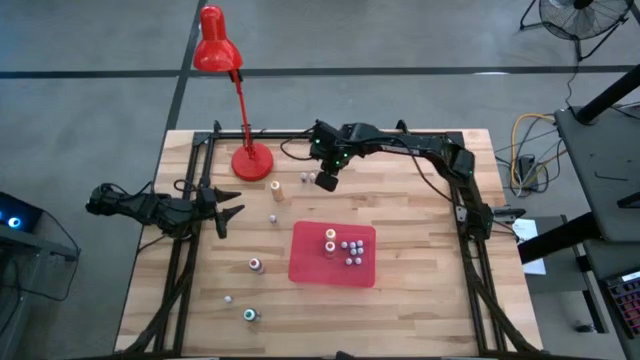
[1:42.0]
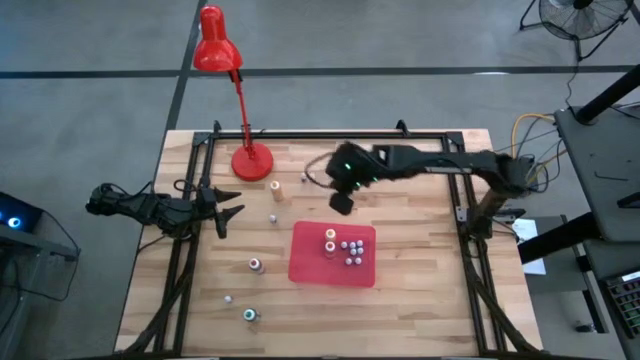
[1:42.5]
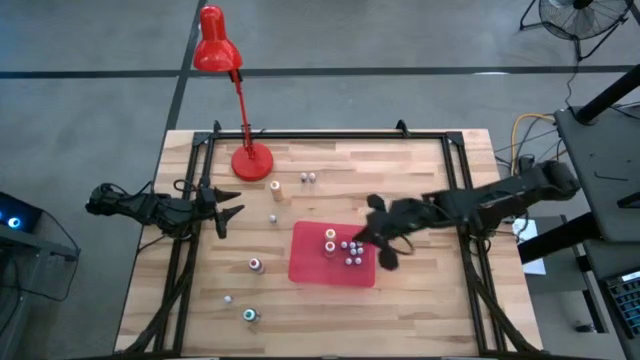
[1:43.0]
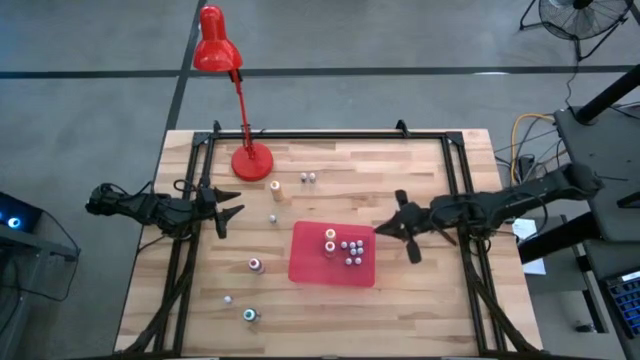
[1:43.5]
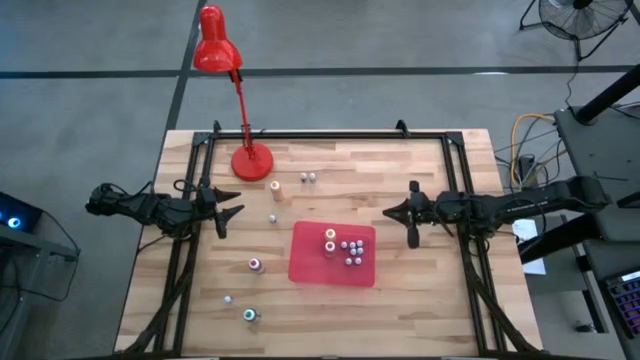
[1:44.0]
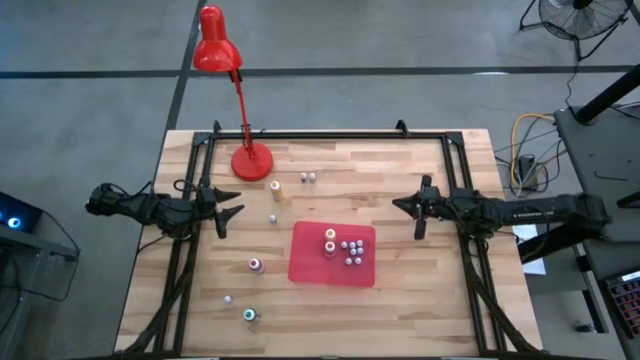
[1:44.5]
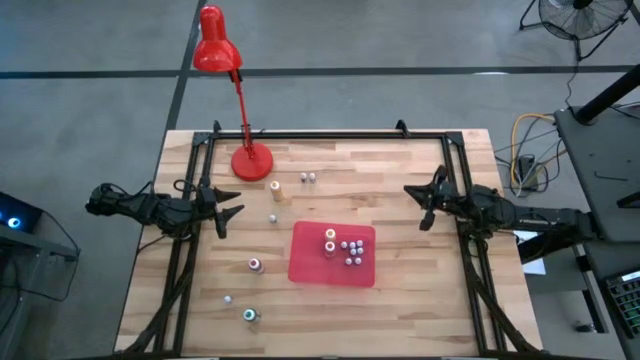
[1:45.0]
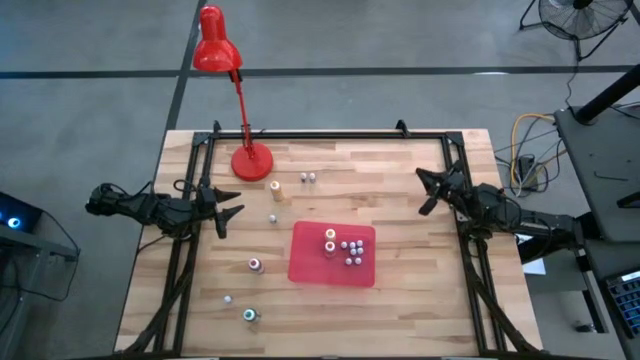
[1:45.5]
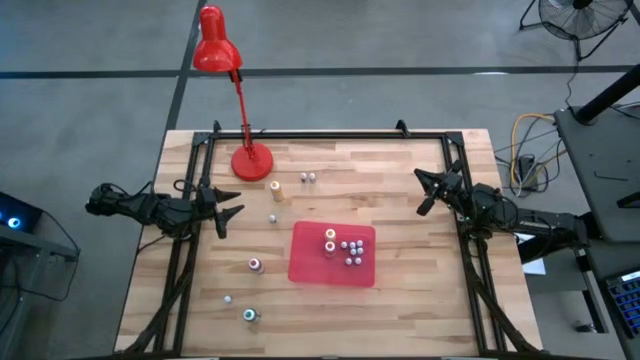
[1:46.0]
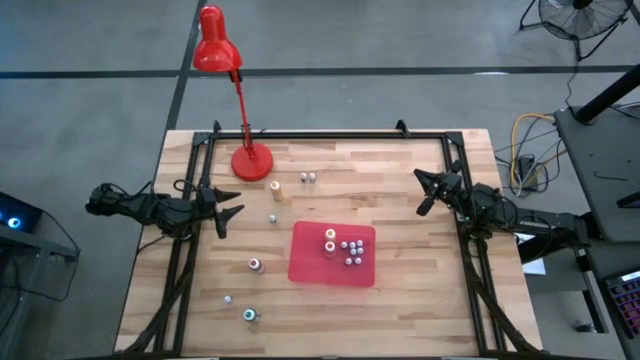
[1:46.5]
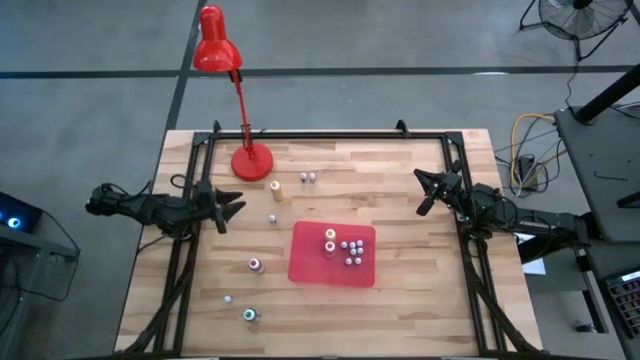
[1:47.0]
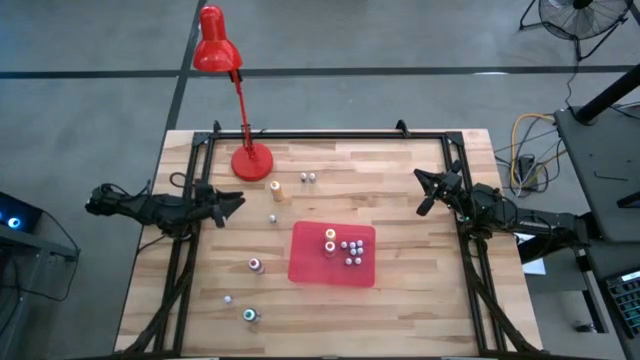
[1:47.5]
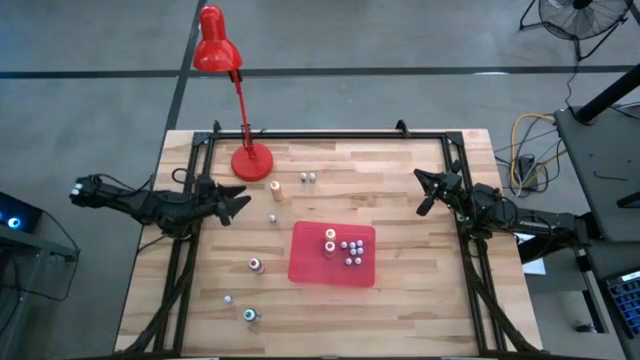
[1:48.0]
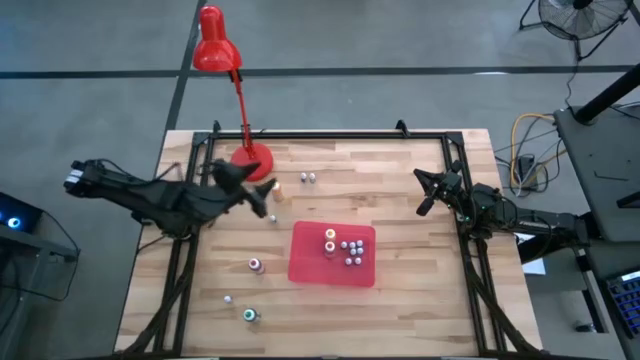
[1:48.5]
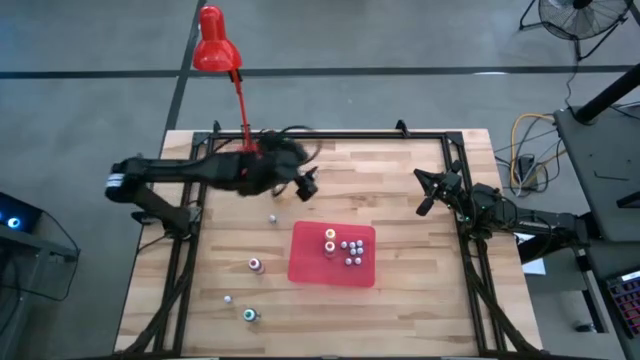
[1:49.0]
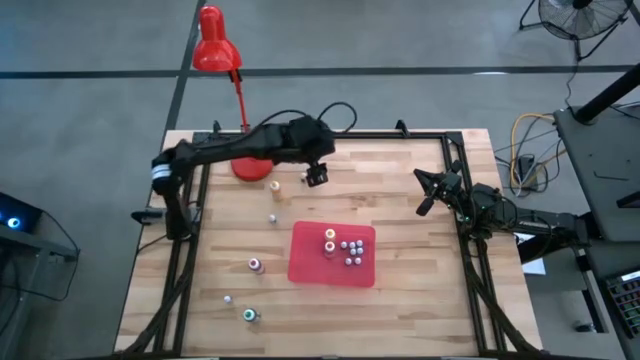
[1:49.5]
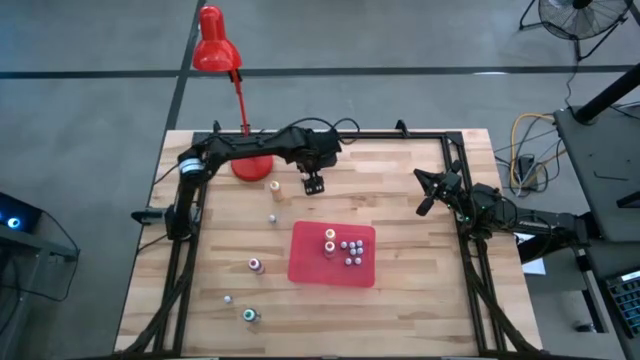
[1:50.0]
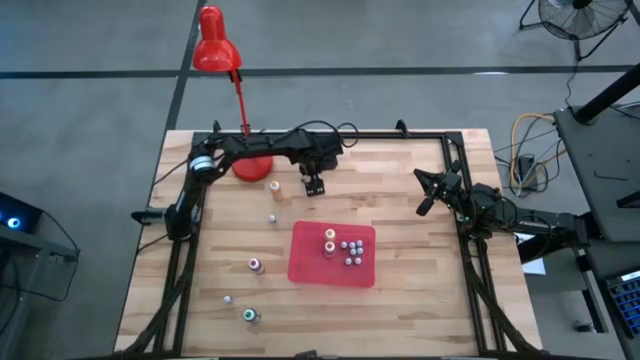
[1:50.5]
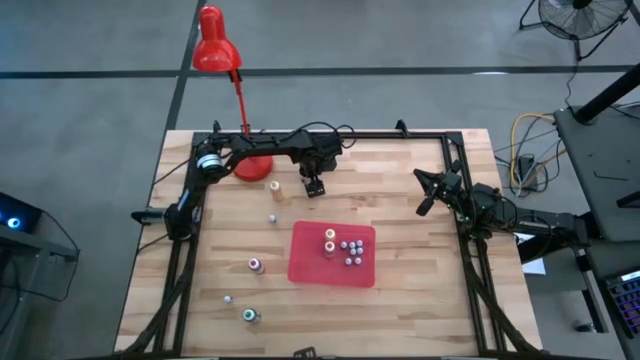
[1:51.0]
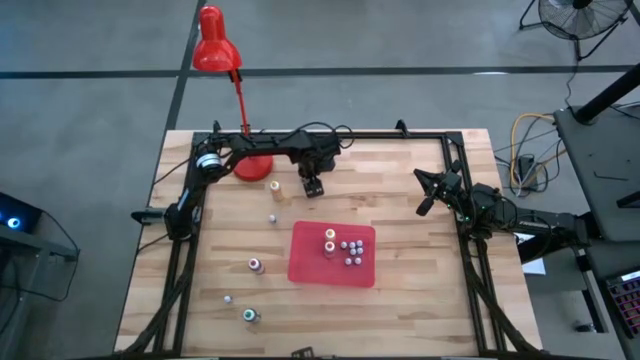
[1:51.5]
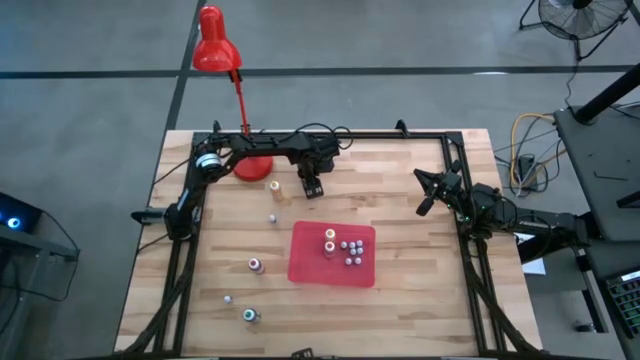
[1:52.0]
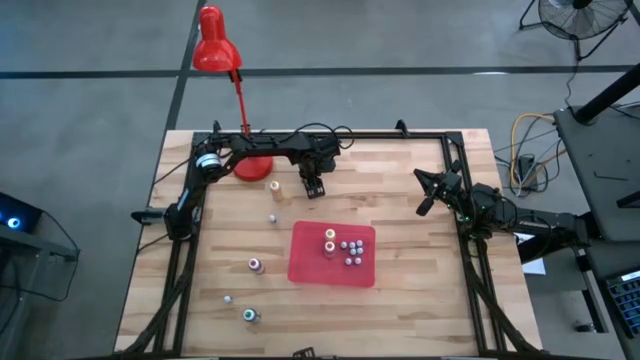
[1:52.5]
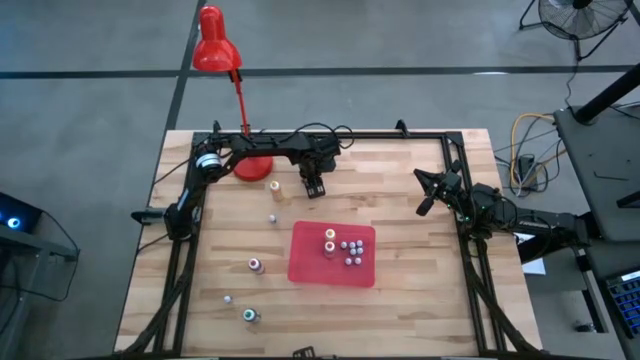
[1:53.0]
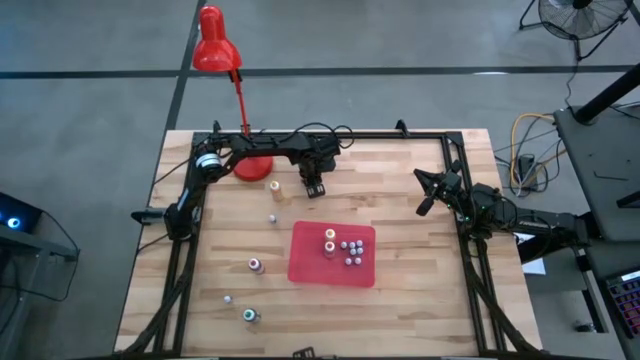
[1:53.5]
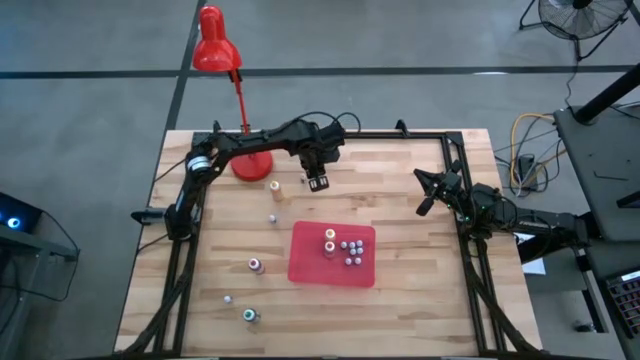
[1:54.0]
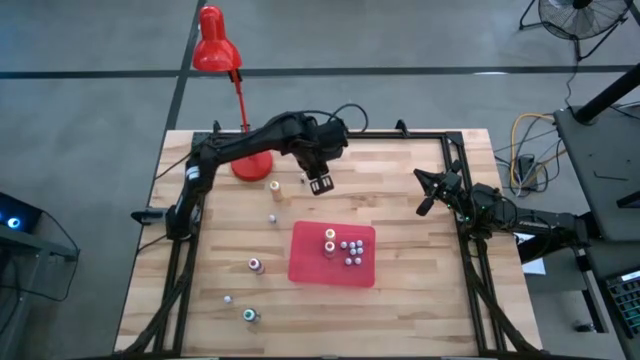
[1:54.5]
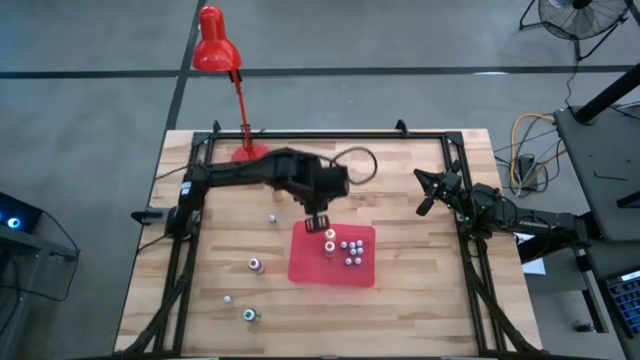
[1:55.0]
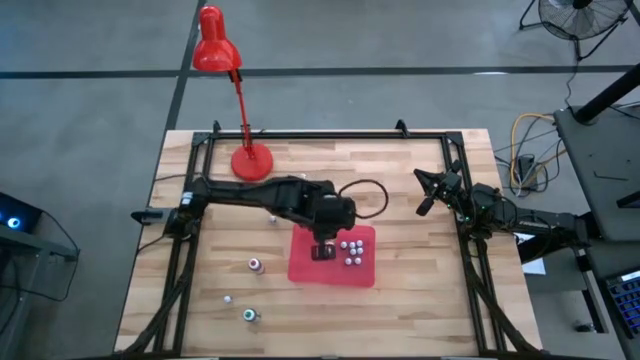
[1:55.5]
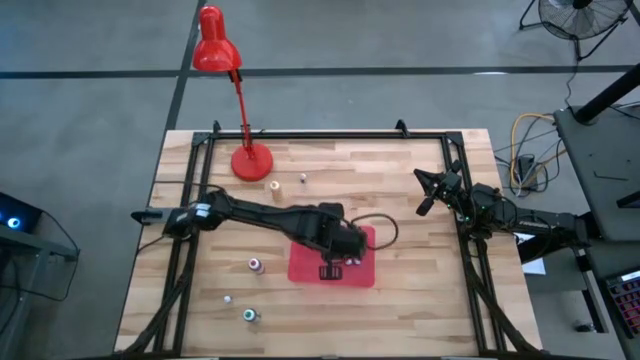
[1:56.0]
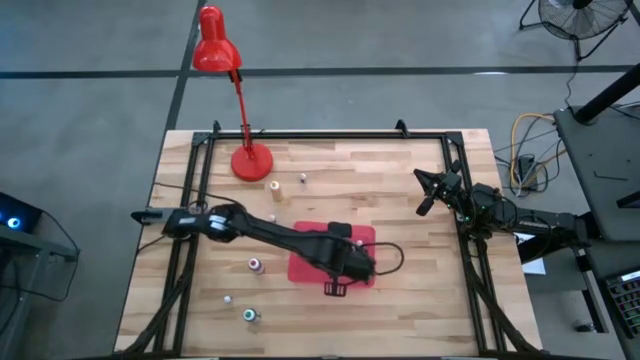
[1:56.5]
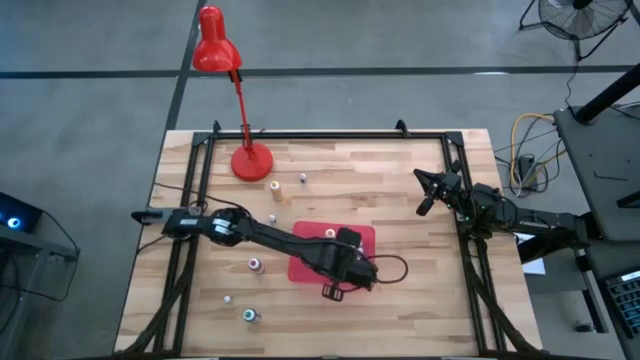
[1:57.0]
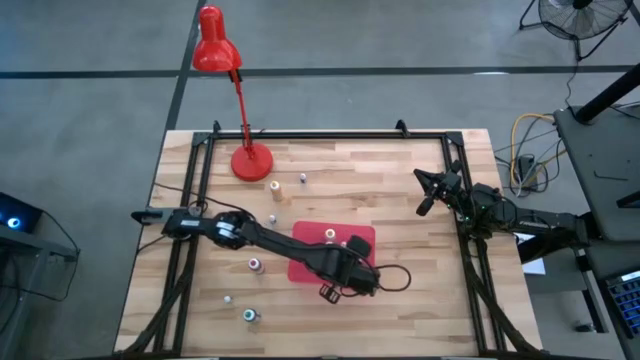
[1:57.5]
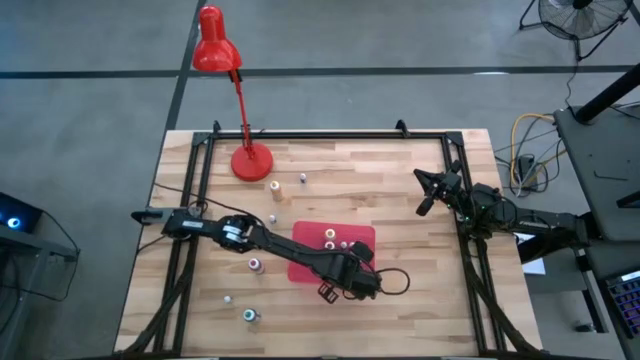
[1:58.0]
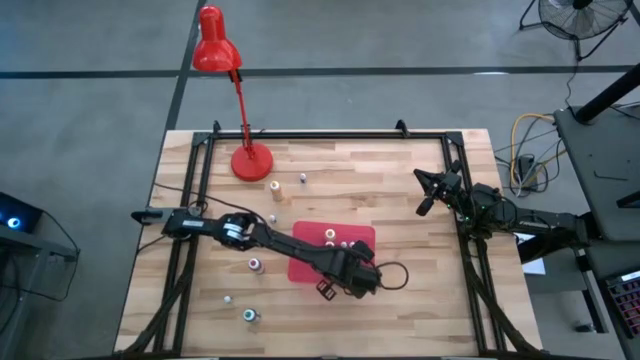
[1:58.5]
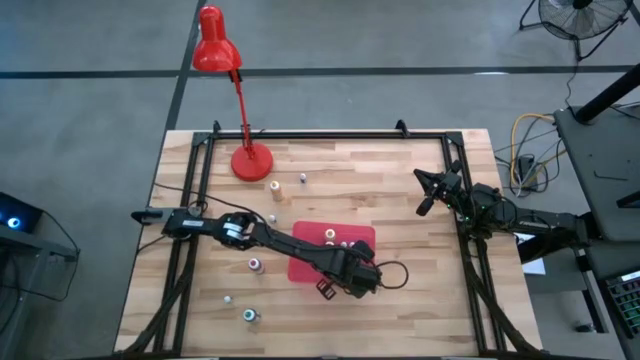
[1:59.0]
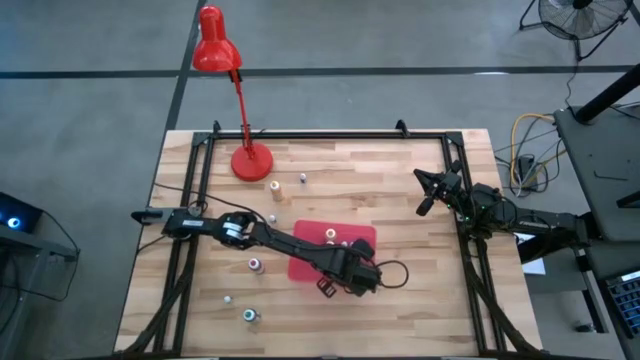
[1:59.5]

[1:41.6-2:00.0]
Task: Pick & Place food coloring
Put the small red food coloring bottle in the red bin

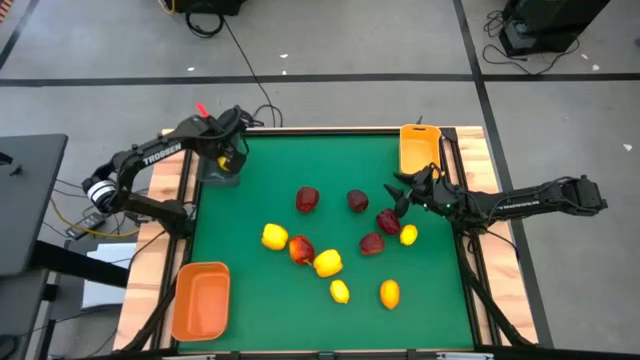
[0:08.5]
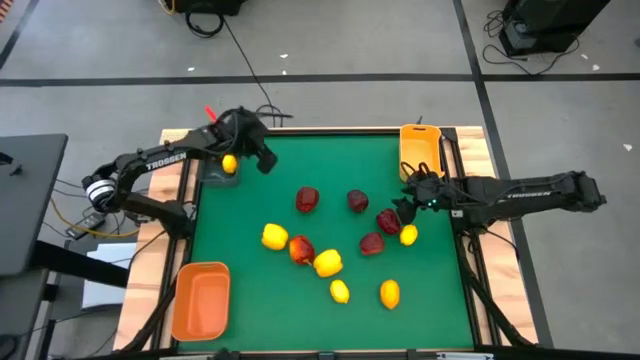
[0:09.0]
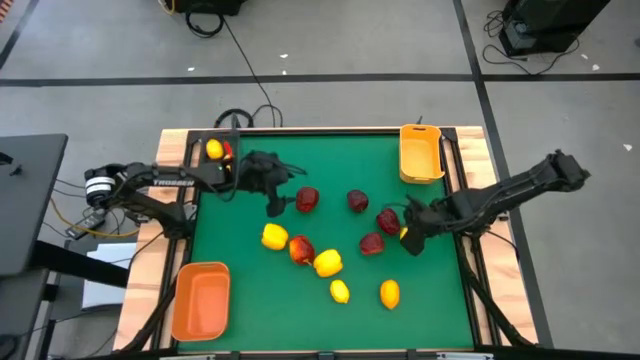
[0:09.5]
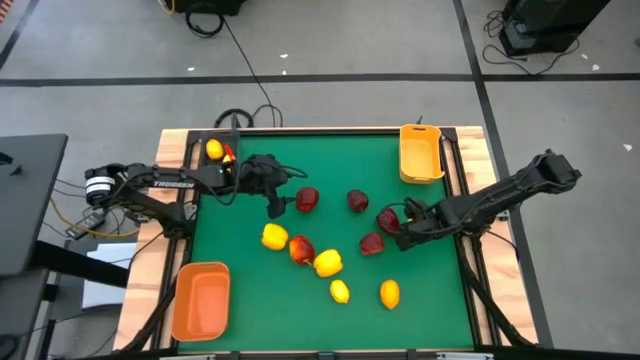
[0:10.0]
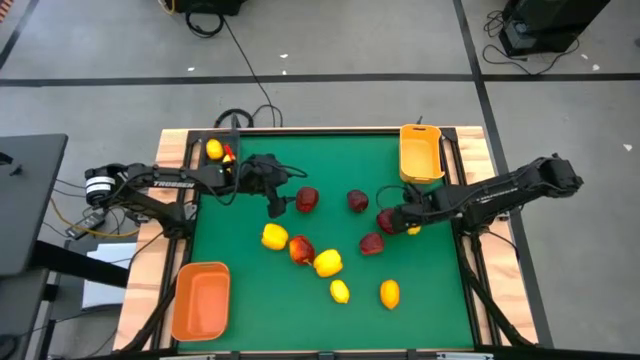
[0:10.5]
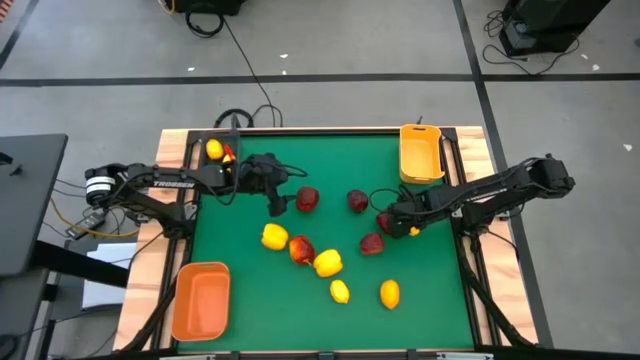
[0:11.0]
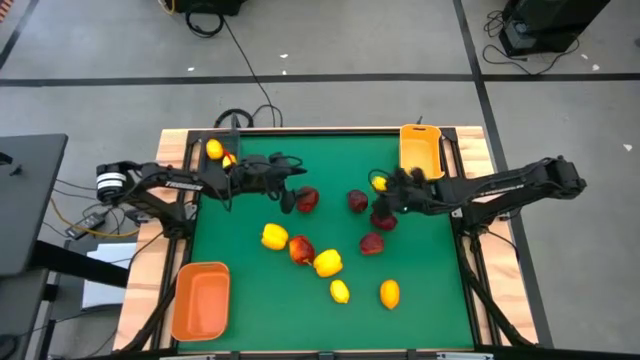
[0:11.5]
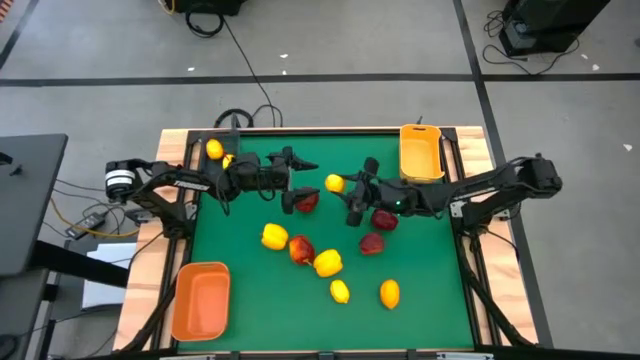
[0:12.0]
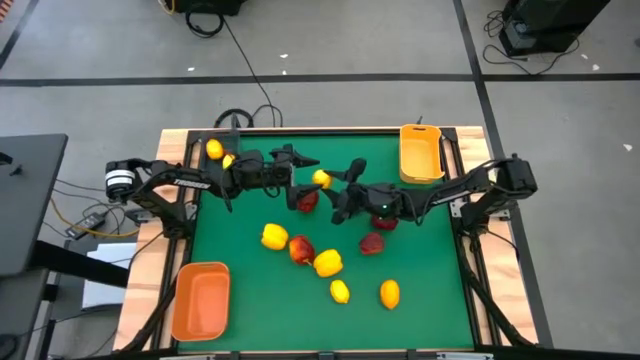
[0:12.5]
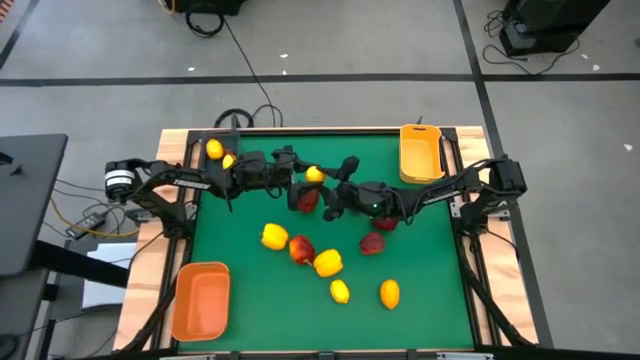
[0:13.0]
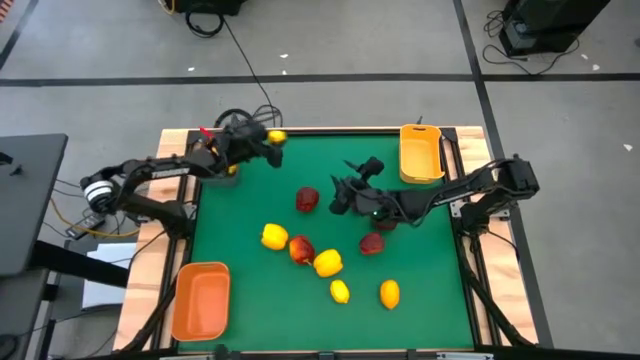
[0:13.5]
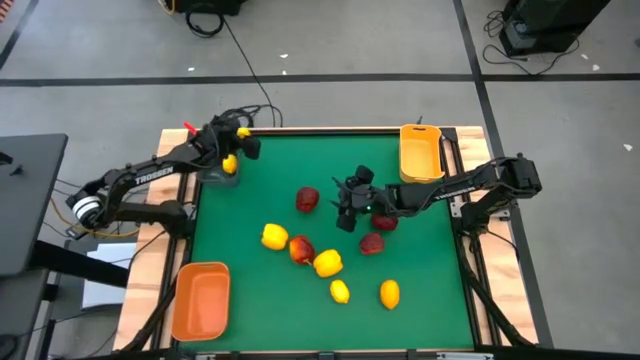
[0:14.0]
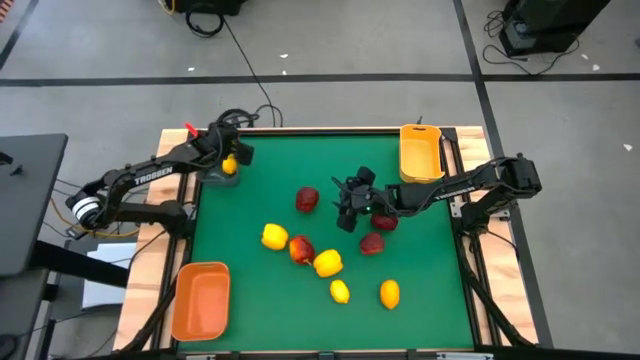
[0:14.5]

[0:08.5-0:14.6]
Task: Sort produce into baskets
Put the lemon into the black bin
